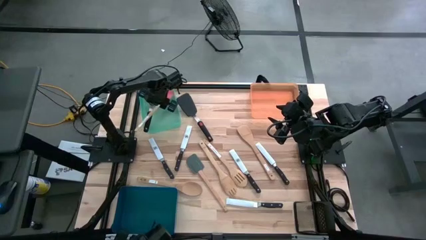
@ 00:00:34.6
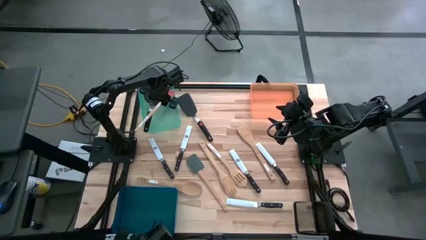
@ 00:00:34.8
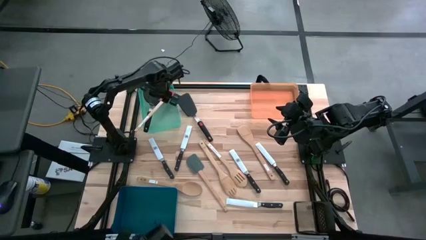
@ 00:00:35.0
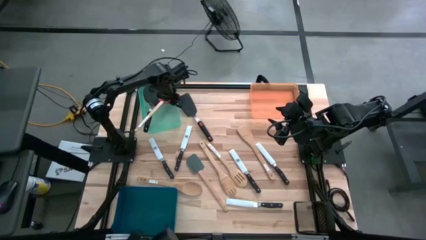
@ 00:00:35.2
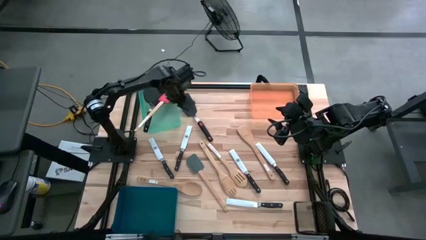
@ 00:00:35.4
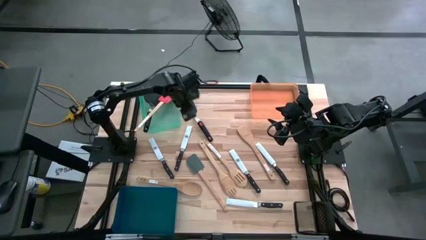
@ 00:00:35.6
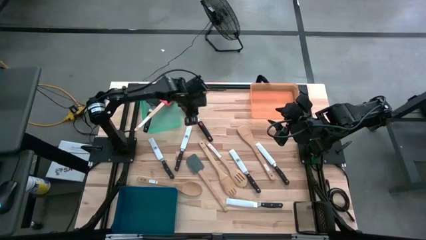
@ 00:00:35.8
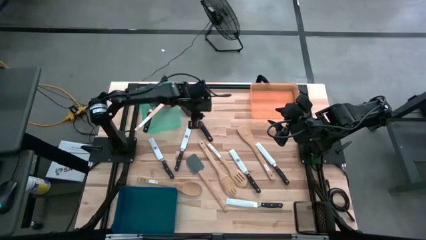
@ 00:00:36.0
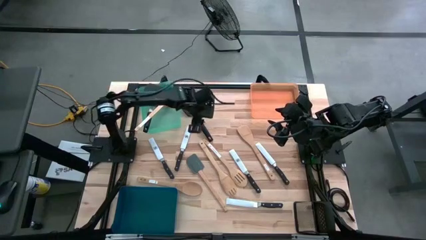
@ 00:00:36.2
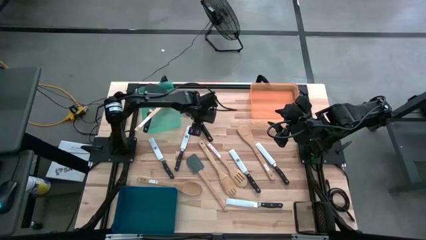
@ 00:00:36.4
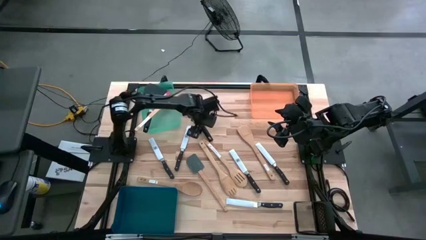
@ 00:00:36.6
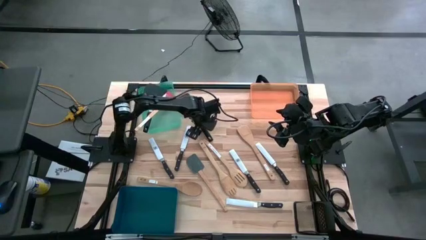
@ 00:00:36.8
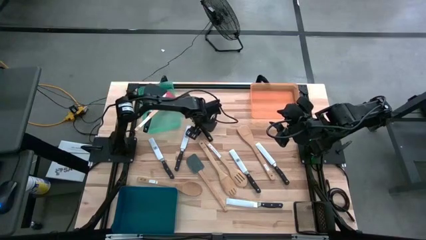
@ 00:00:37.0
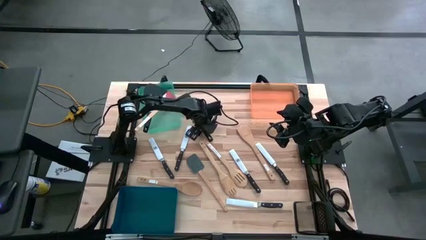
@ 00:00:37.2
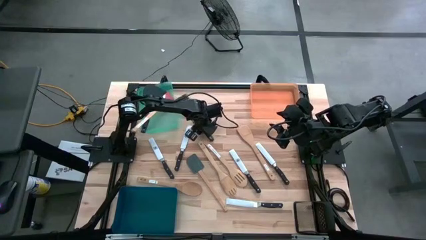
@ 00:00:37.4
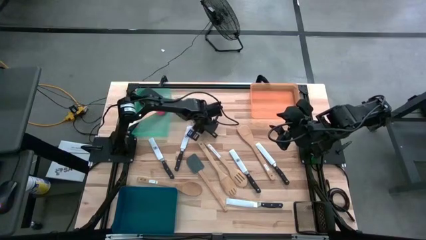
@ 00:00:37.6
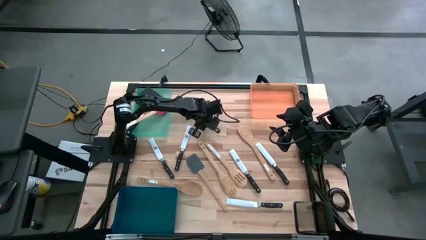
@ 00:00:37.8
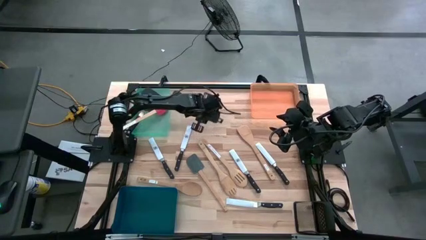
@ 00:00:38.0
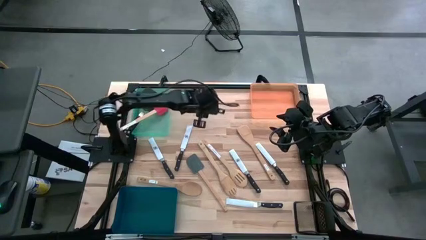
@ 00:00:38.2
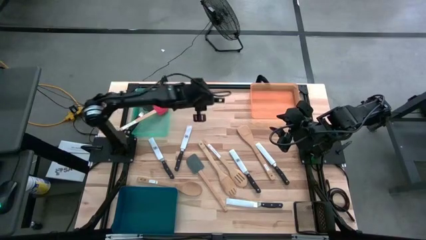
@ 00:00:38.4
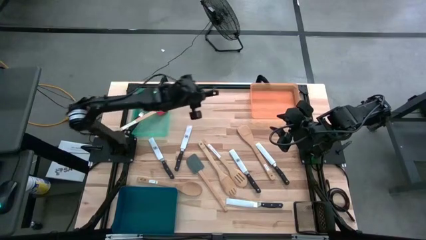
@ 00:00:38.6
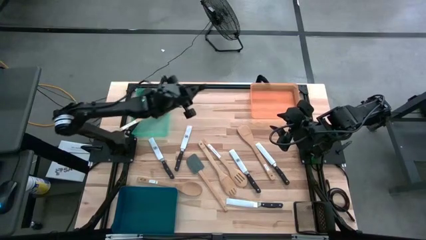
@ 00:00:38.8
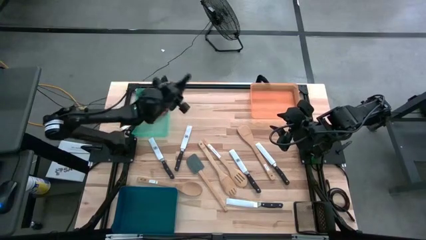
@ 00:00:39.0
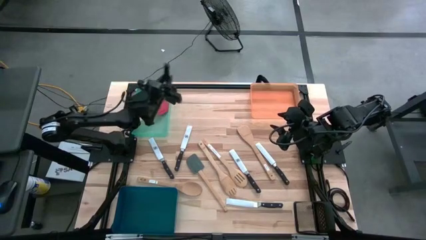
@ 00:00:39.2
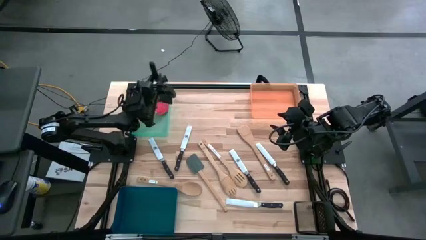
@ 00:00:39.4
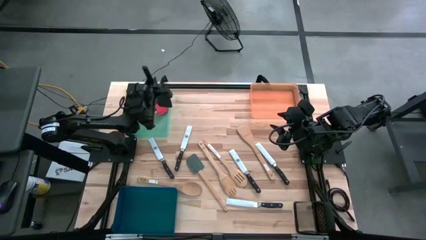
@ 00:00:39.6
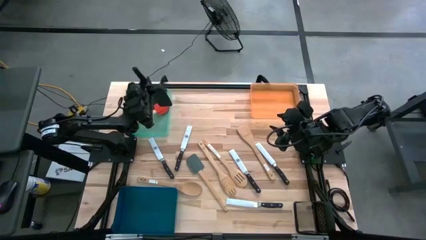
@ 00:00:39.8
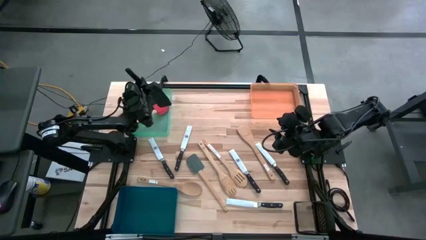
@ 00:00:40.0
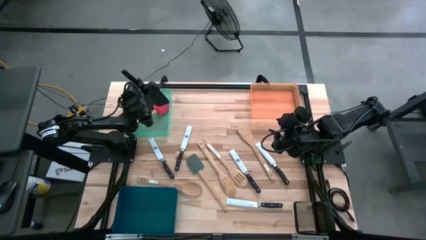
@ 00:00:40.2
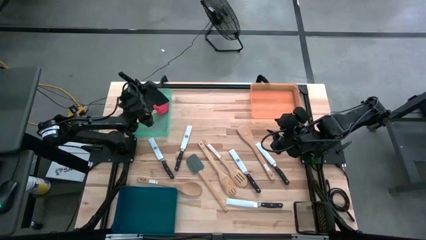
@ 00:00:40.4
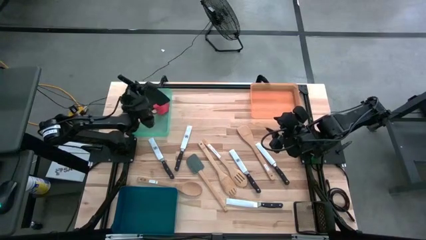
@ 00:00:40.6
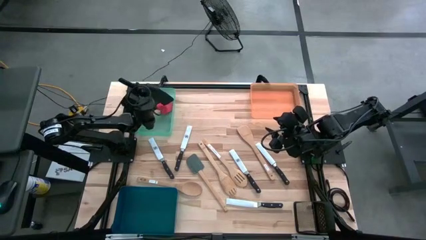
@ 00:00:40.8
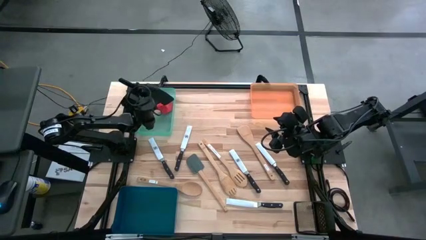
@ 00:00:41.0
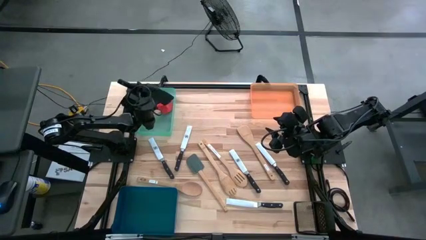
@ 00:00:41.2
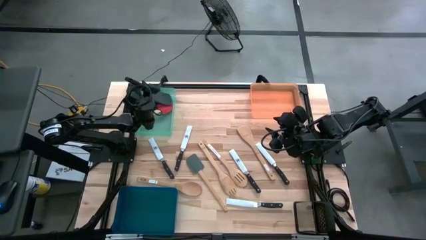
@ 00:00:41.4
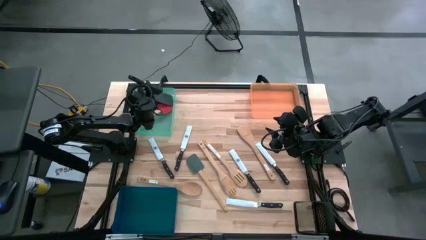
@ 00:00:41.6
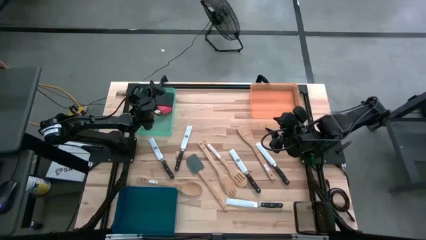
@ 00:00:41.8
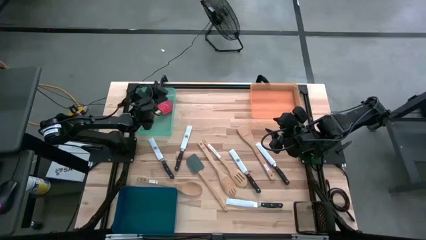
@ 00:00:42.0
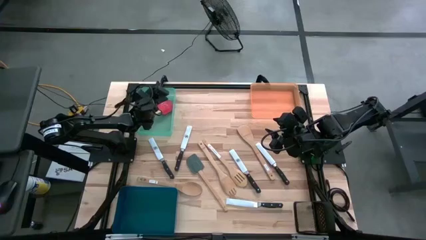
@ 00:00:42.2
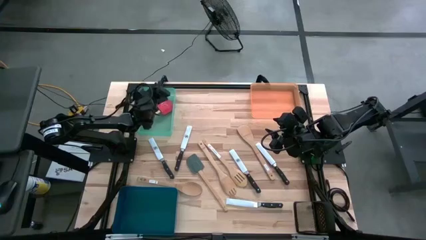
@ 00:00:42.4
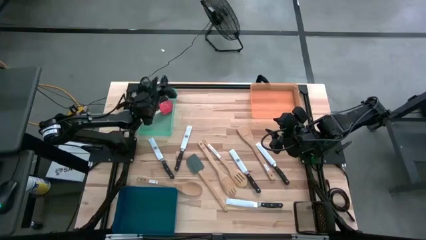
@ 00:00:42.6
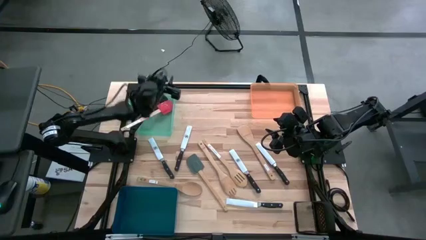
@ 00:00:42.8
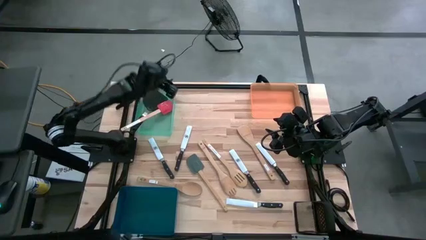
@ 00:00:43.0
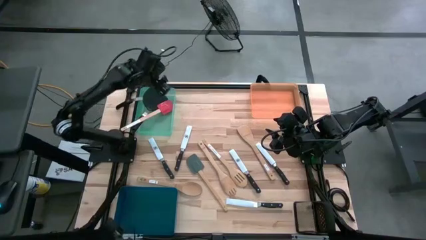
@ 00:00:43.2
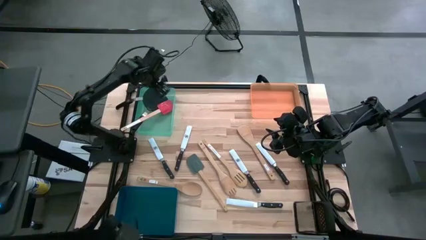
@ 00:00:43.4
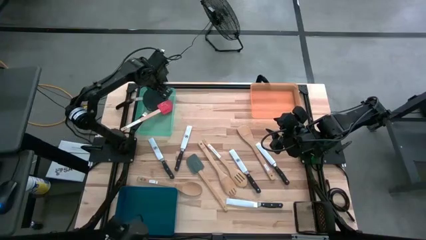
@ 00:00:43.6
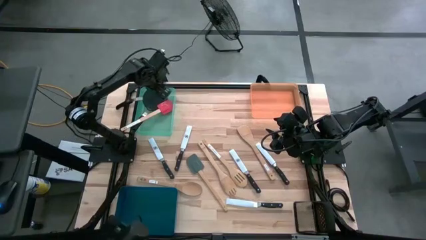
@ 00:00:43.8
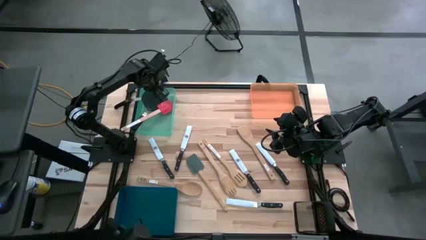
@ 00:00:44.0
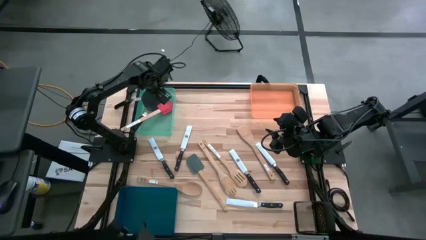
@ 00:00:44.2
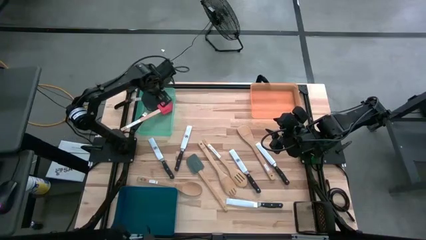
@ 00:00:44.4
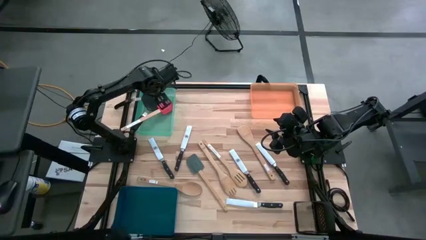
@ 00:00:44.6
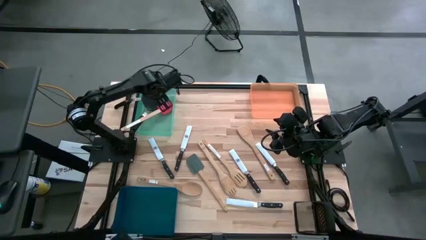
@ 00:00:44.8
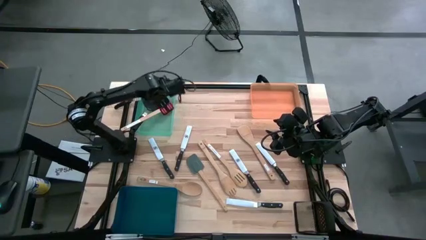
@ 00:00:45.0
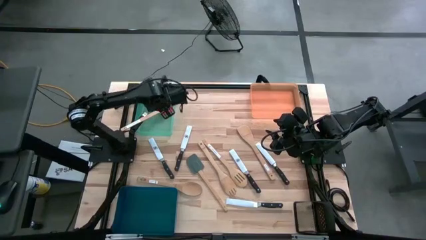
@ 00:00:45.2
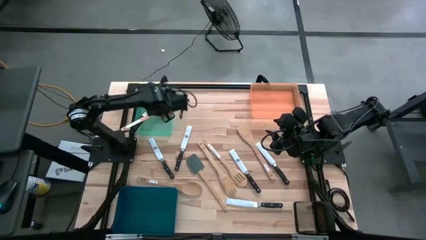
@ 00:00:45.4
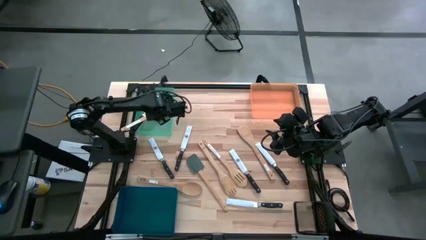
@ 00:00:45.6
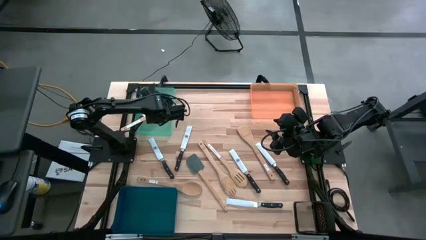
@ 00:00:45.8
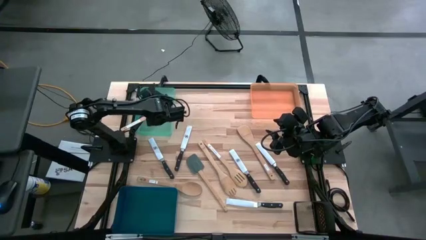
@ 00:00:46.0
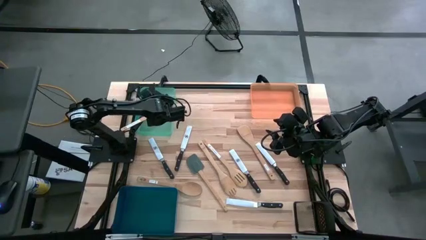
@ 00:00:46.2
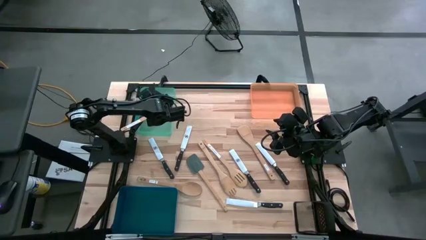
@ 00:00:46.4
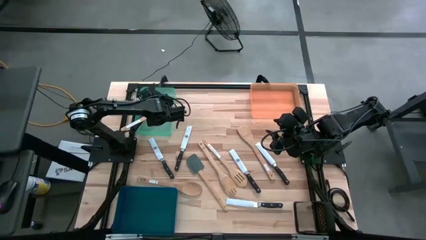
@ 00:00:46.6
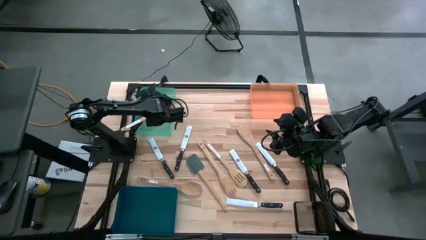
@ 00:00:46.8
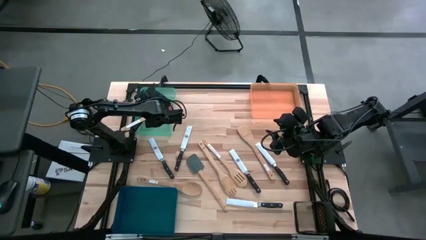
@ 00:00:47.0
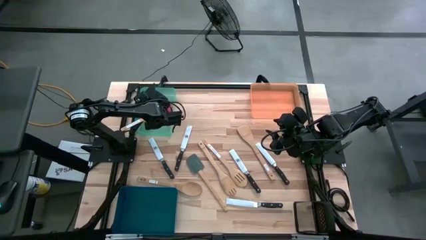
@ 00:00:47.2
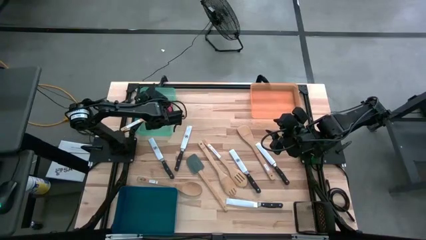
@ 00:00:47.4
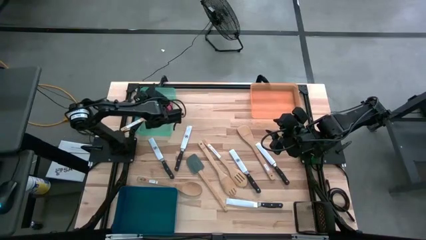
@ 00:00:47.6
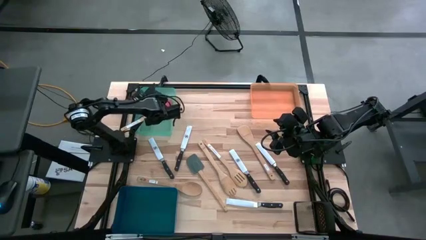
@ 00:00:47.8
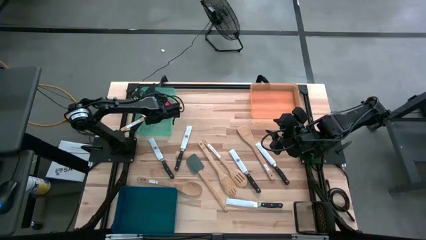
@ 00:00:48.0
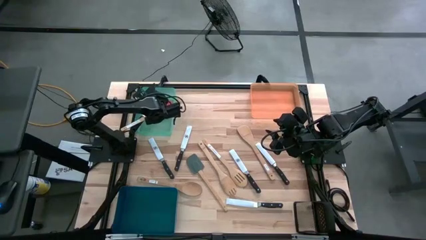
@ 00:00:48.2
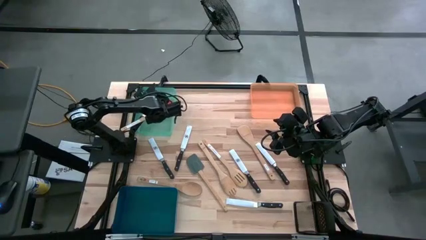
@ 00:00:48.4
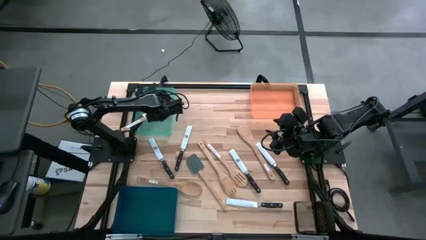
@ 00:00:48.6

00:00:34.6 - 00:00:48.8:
Task: Pick & Place Kitchen Items
Put the black turner spatula into the blue green bin
